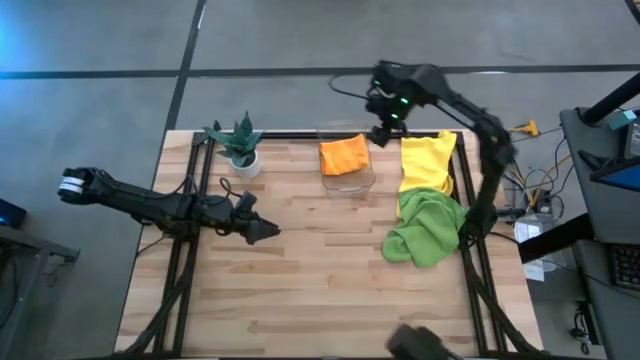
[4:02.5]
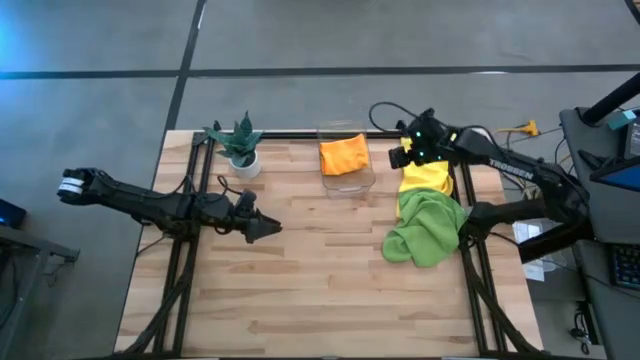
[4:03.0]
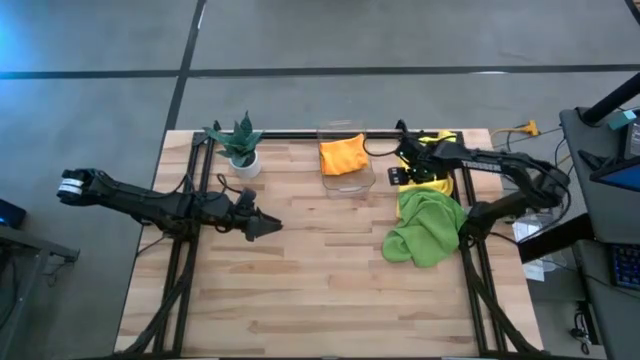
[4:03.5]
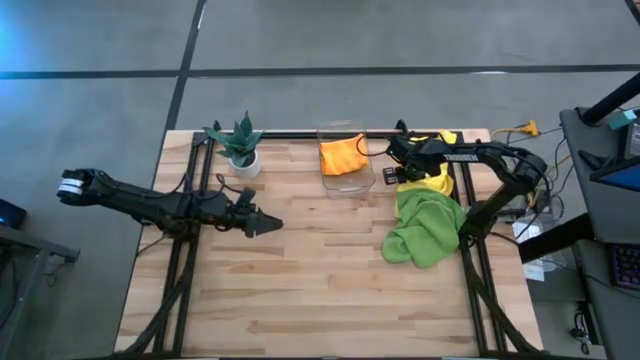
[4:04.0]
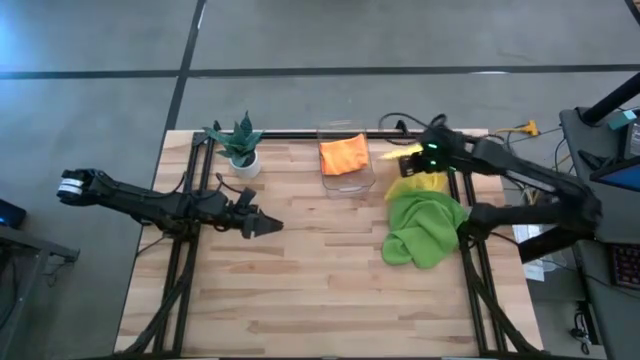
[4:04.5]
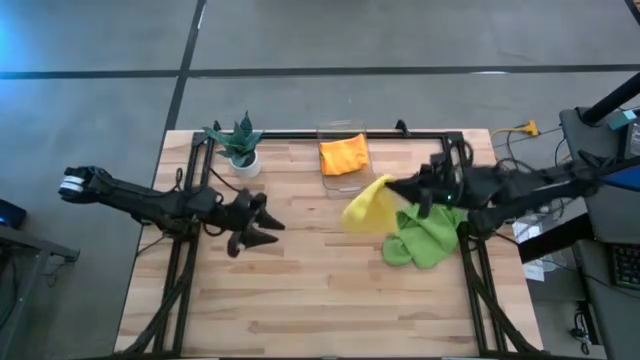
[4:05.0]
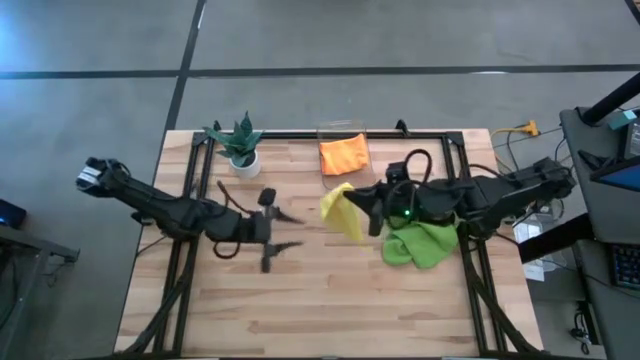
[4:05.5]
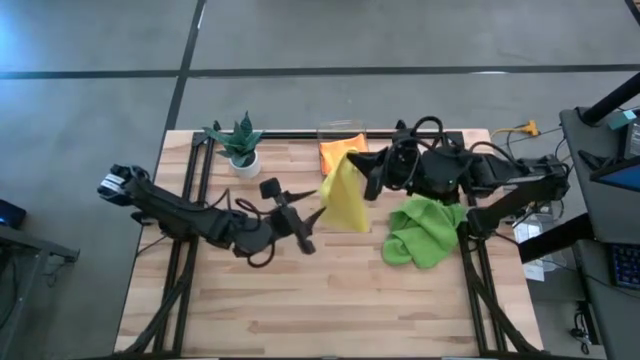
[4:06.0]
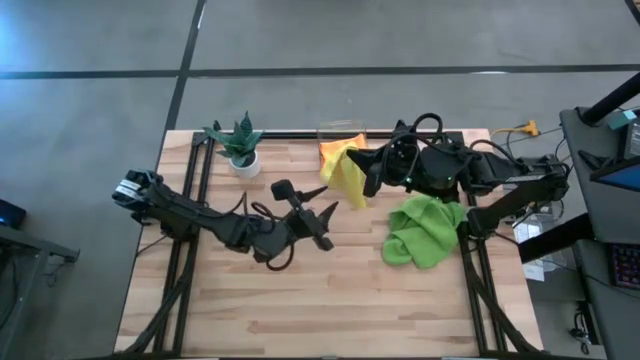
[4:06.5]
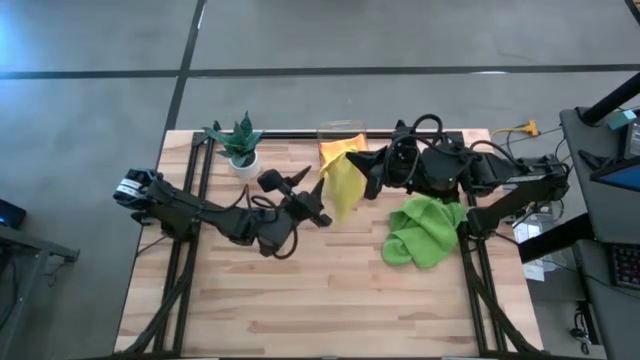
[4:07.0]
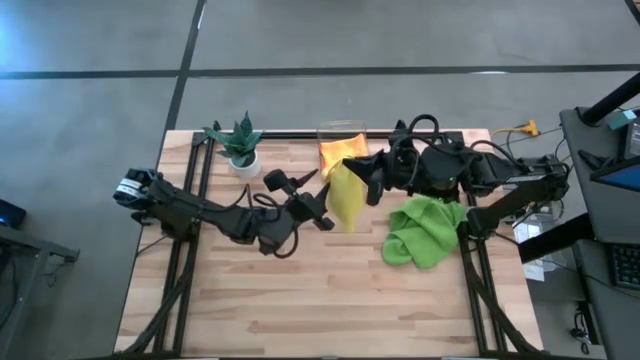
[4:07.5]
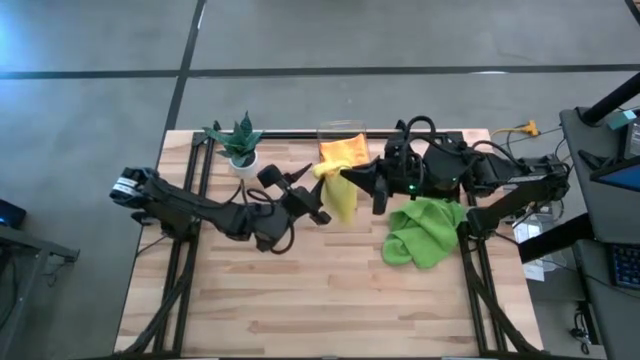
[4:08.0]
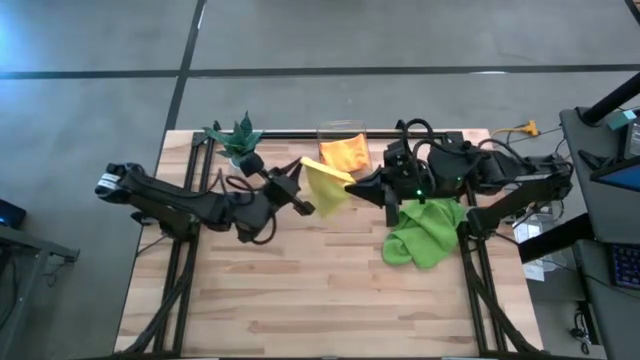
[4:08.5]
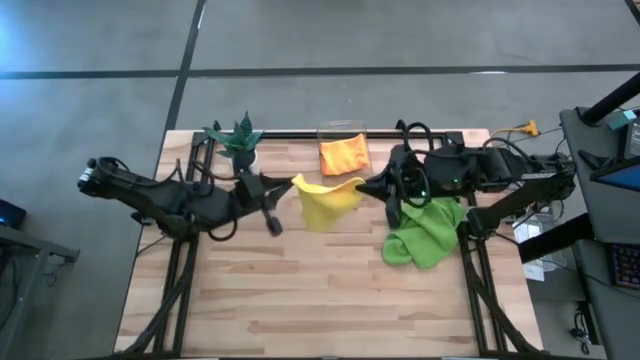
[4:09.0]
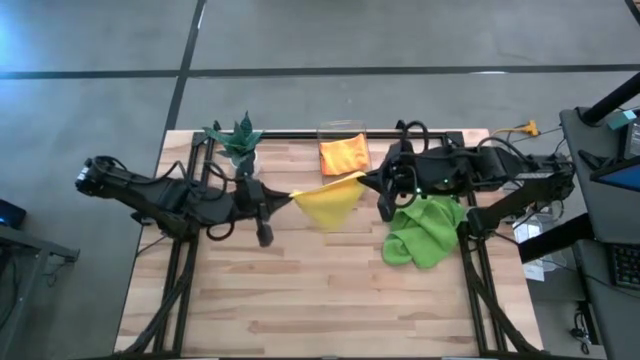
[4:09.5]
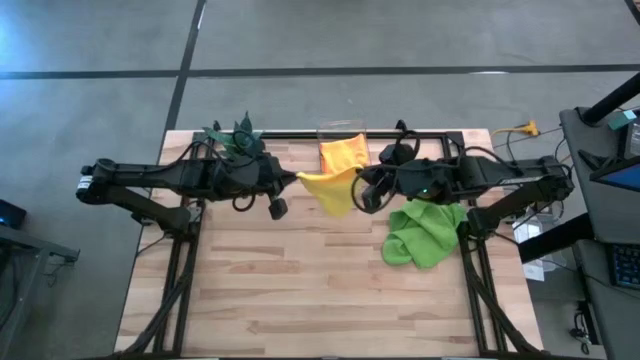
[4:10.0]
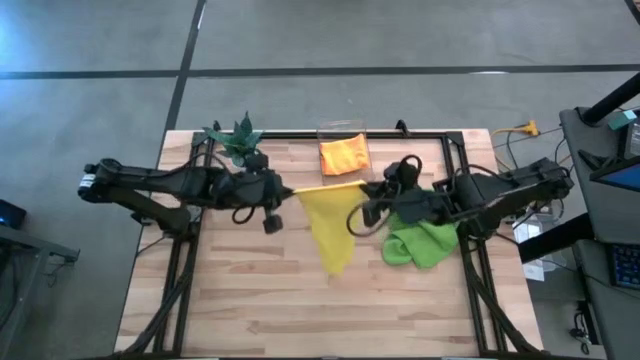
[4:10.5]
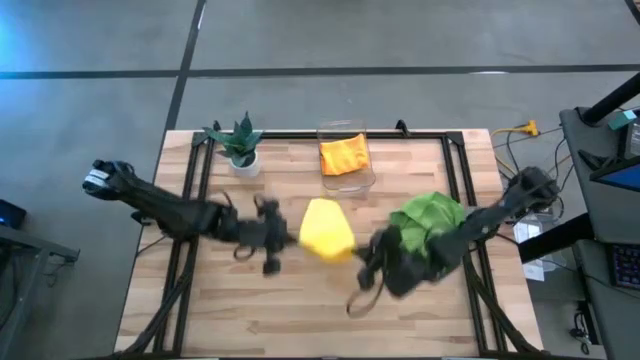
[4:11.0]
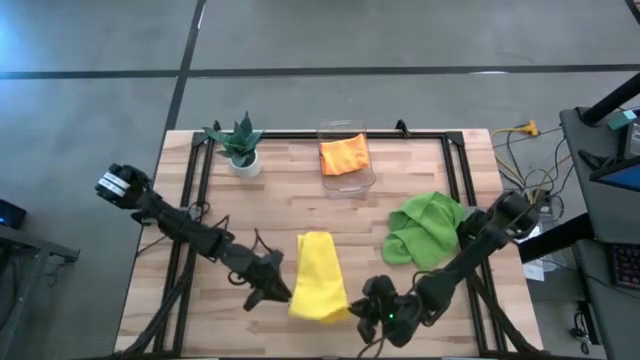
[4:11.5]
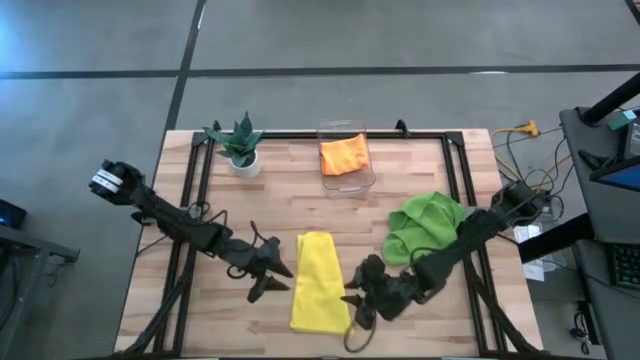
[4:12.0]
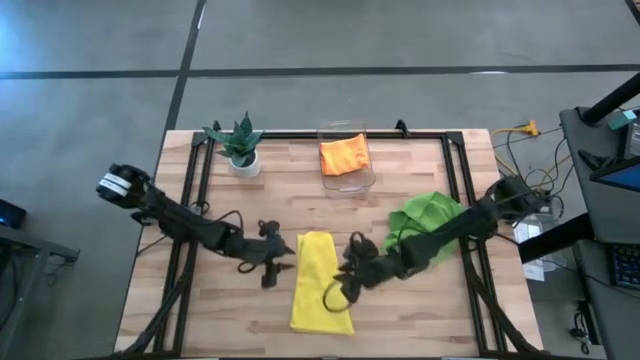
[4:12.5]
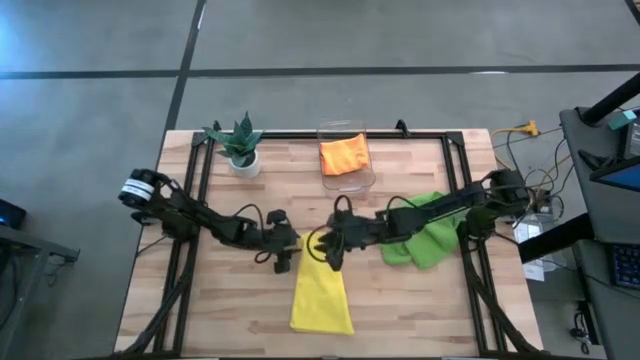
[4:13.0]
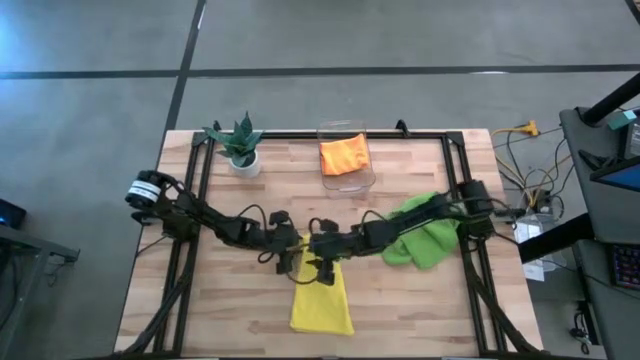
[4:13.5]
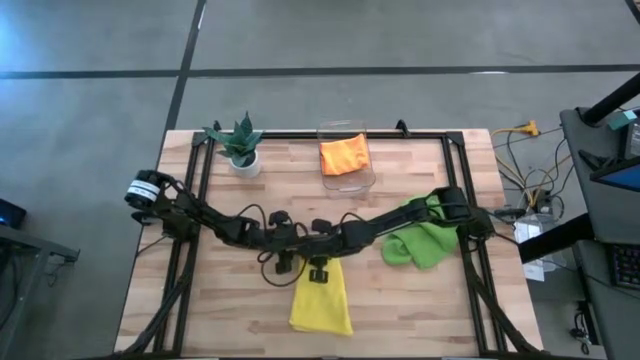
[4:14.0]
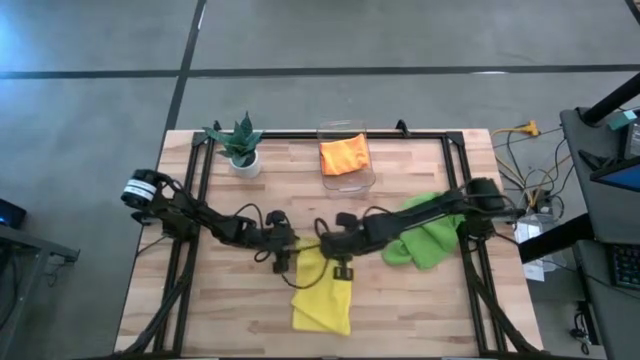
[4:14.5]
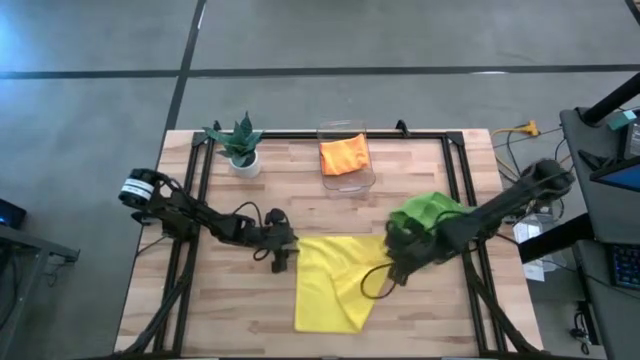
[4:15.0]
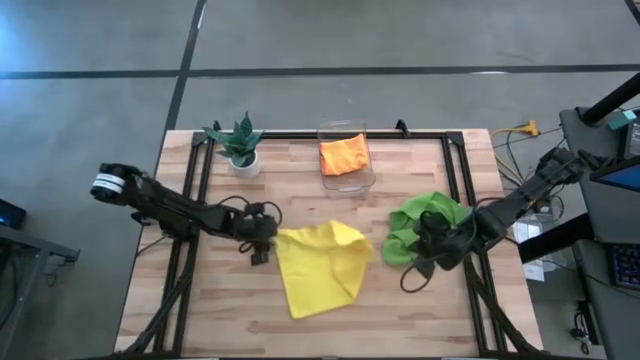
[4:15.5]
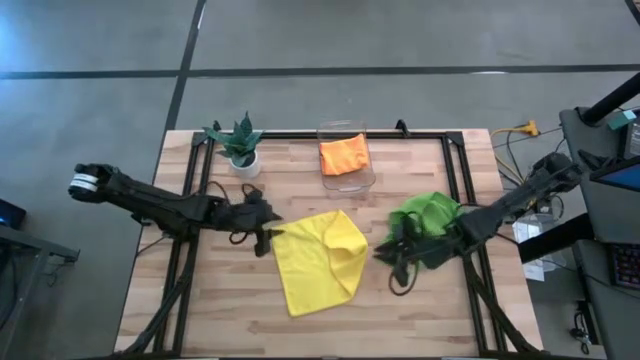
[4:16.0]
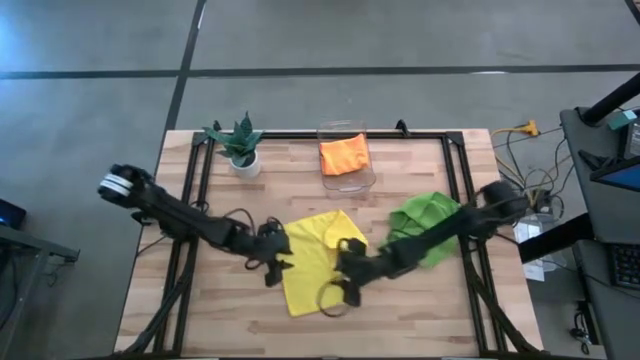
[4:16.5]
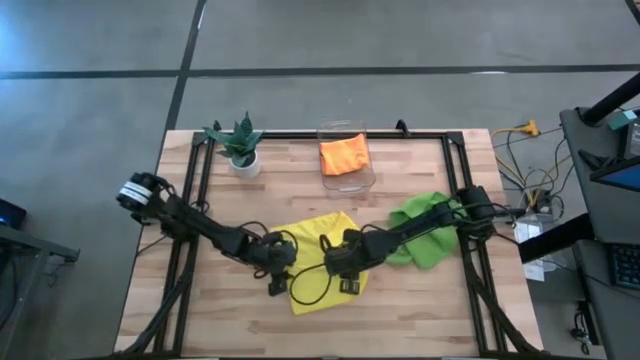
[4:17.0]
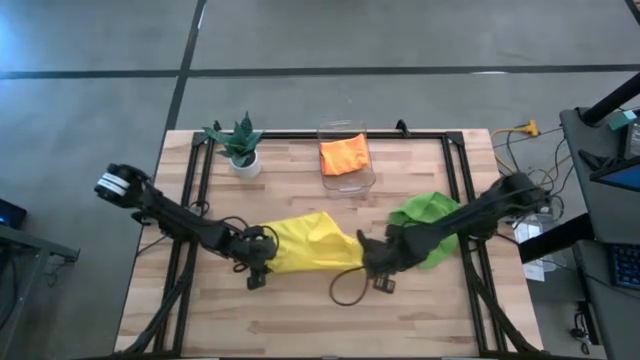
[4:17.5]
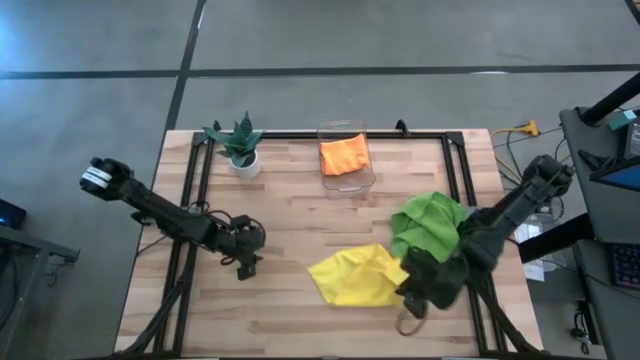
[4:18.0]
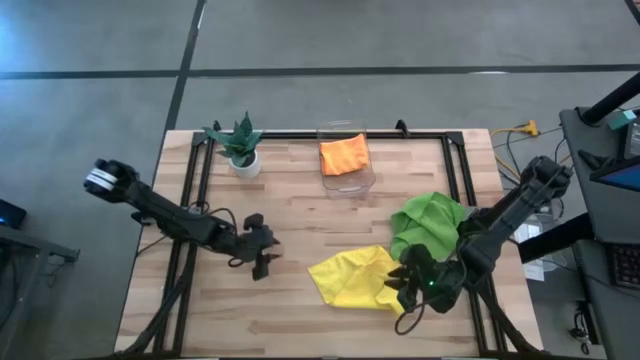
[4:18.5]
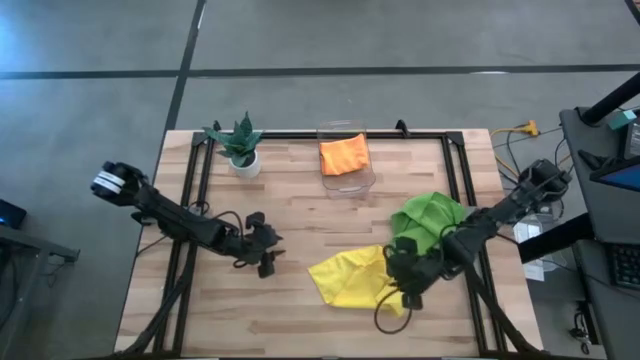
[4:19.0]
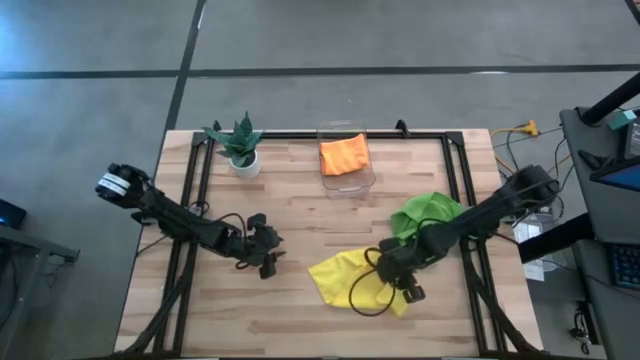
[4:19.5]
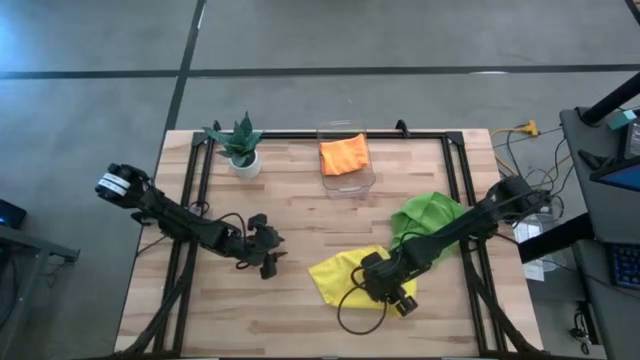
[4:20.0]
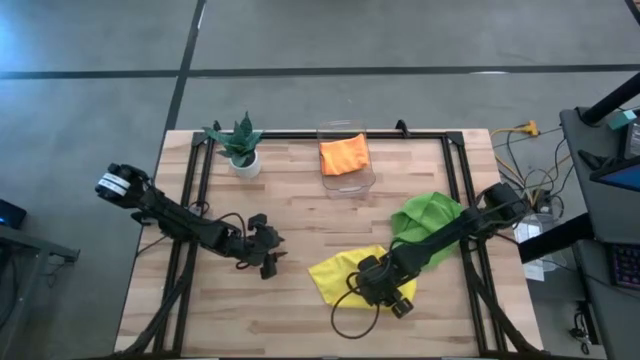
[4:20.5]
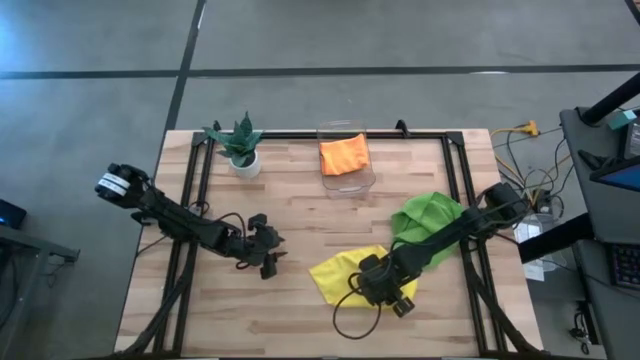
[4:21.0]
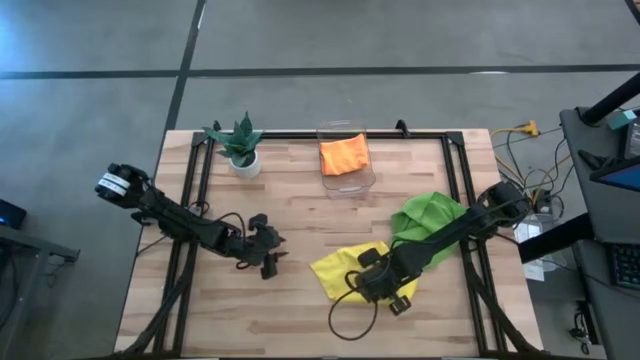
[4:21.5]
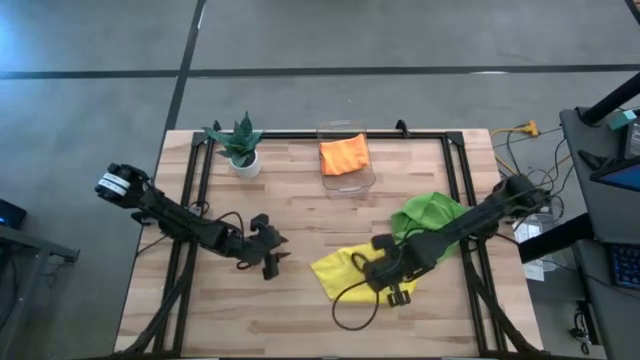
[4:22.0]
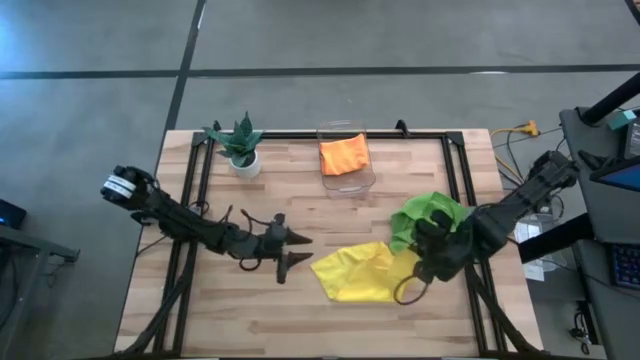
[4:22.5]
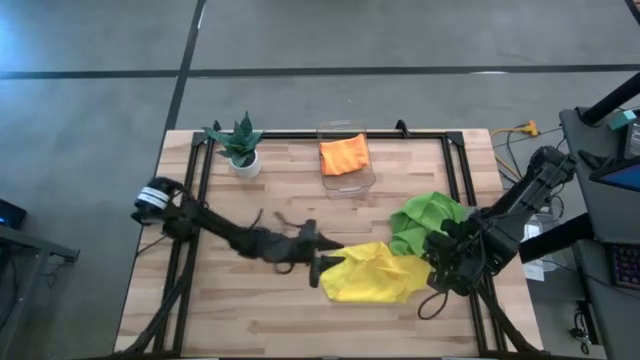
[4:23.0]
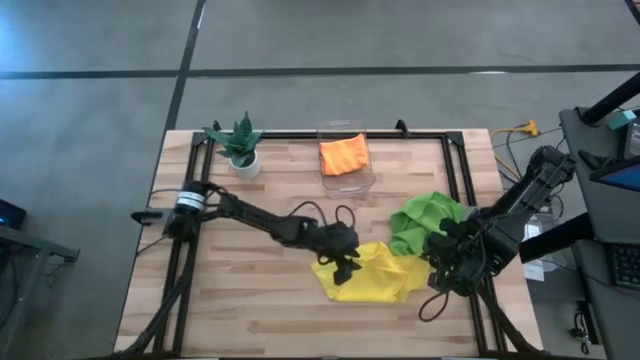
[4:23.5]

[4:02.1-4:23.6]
Task: Fold microfiber towels
Fold the yellow towel
